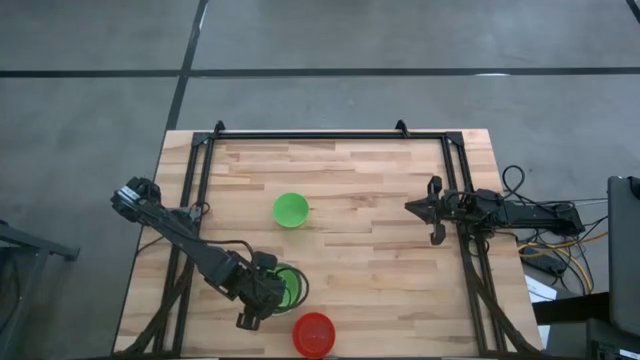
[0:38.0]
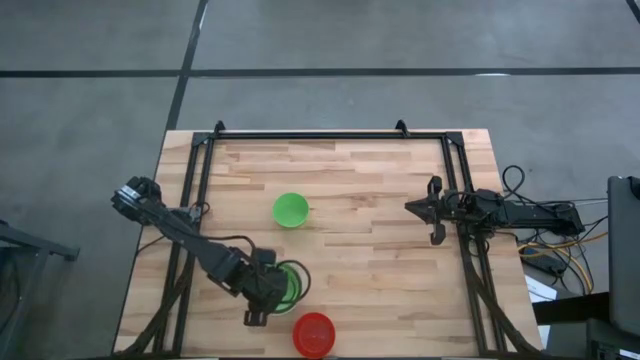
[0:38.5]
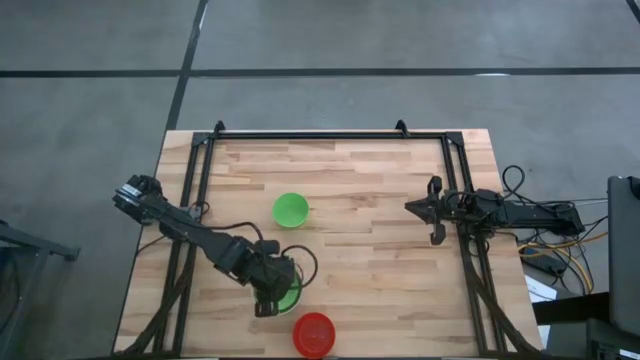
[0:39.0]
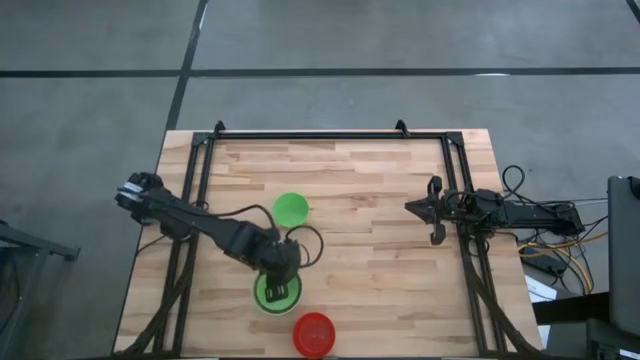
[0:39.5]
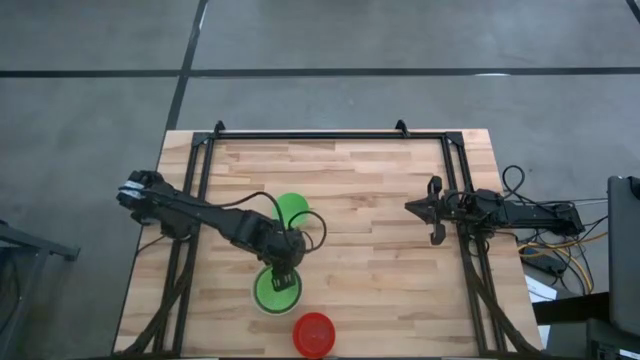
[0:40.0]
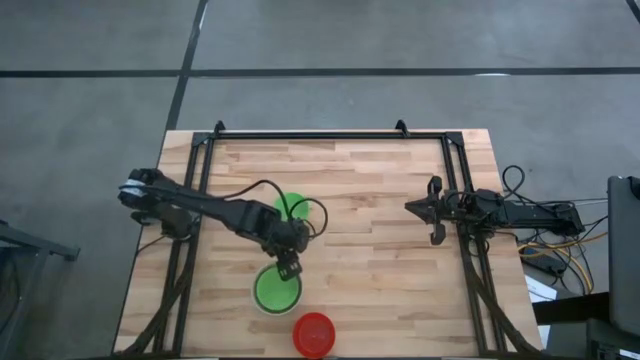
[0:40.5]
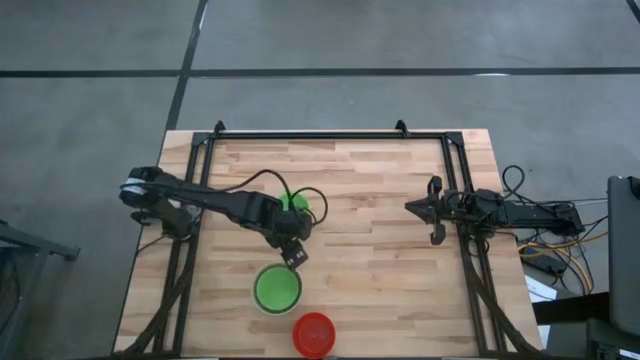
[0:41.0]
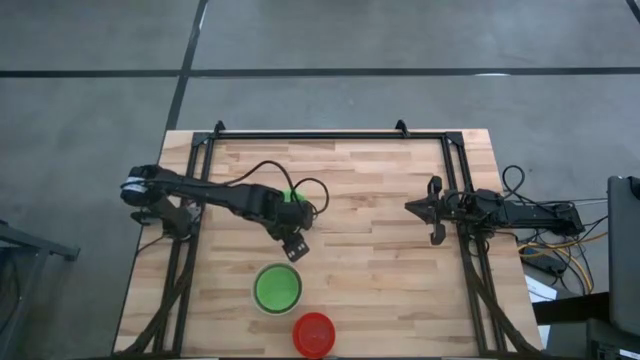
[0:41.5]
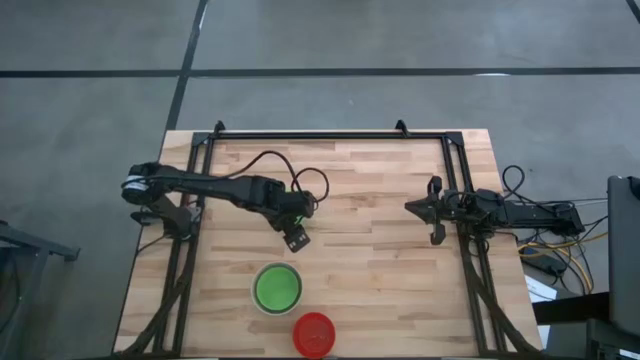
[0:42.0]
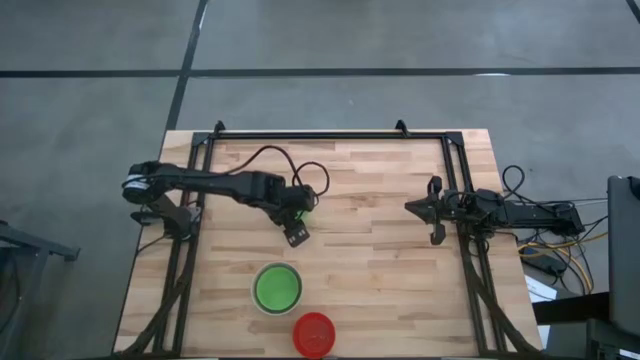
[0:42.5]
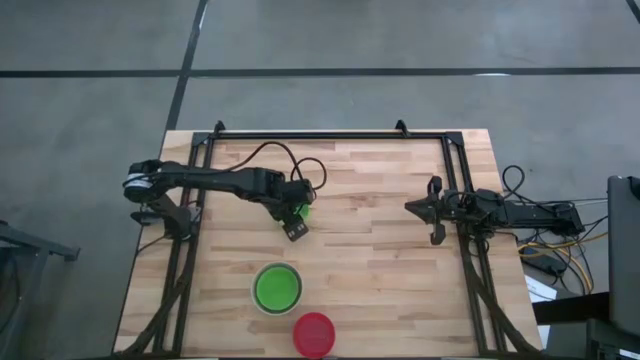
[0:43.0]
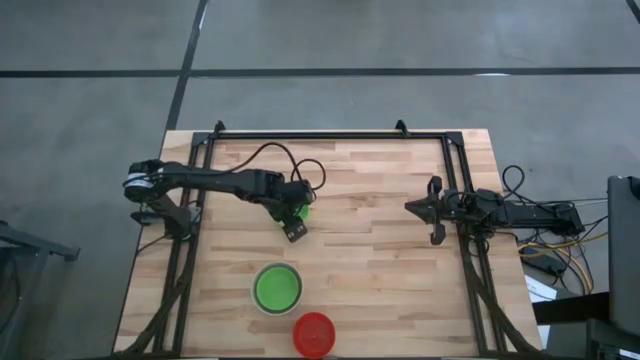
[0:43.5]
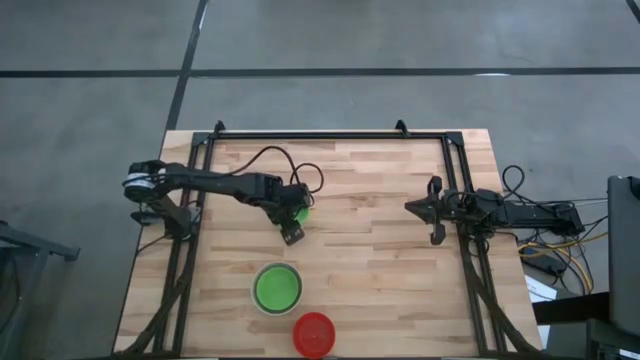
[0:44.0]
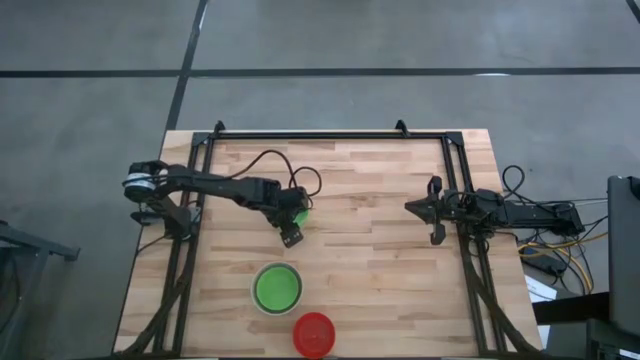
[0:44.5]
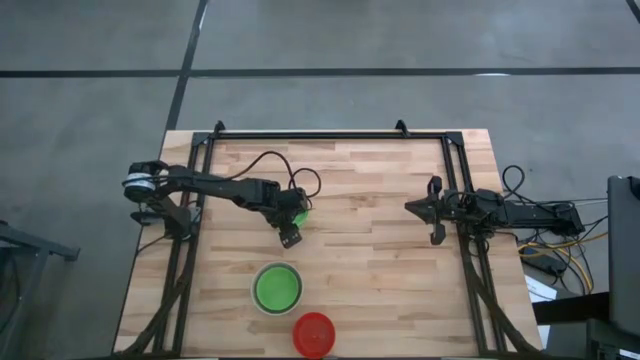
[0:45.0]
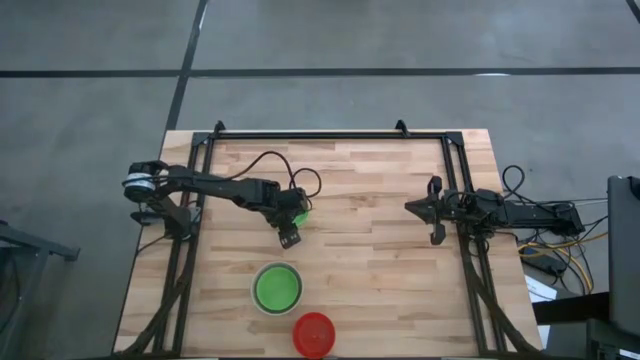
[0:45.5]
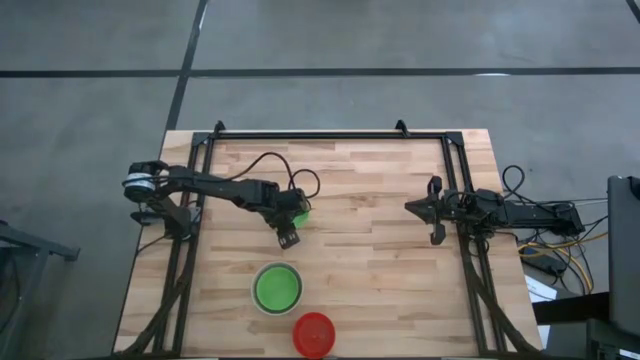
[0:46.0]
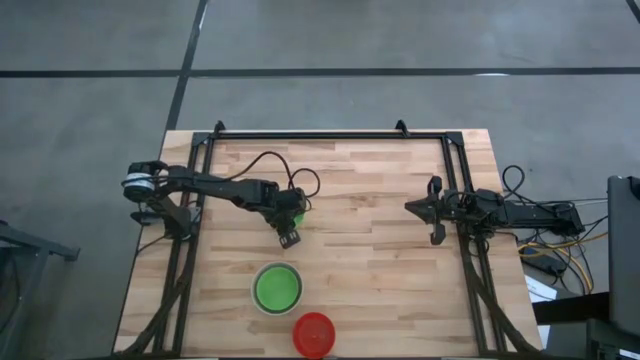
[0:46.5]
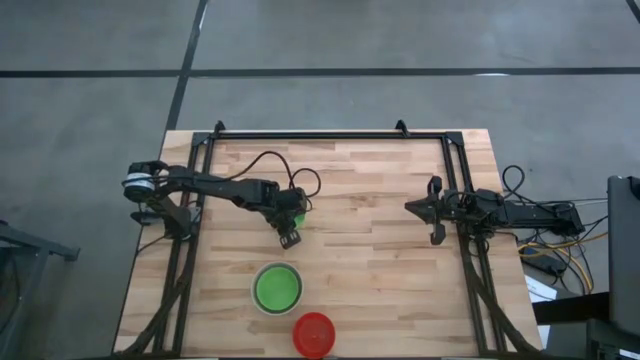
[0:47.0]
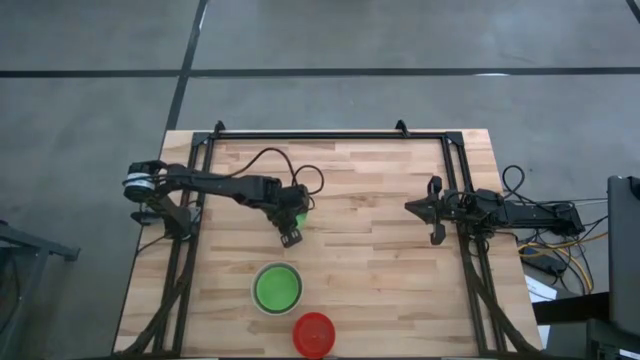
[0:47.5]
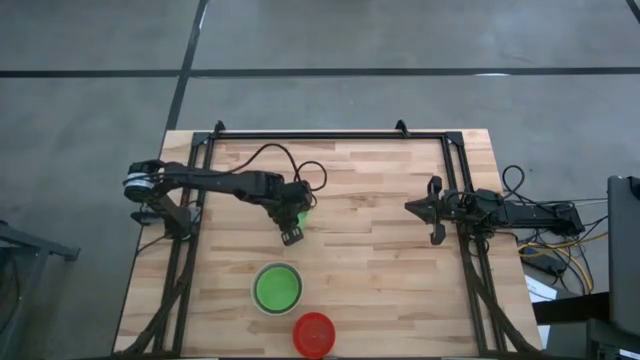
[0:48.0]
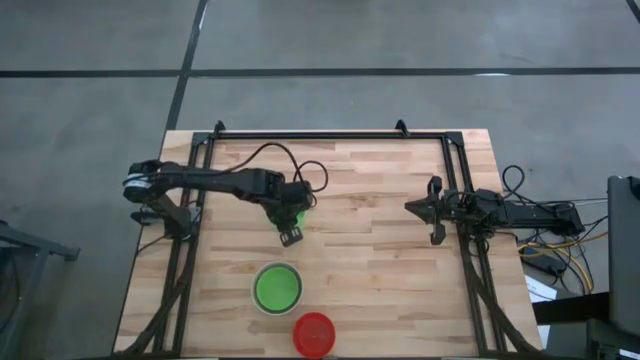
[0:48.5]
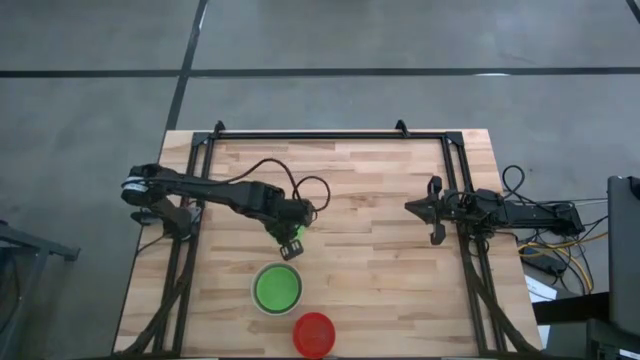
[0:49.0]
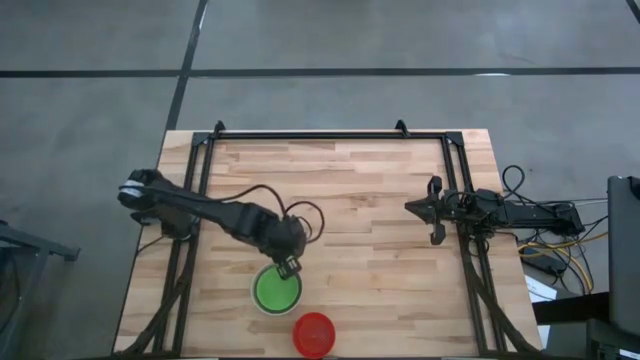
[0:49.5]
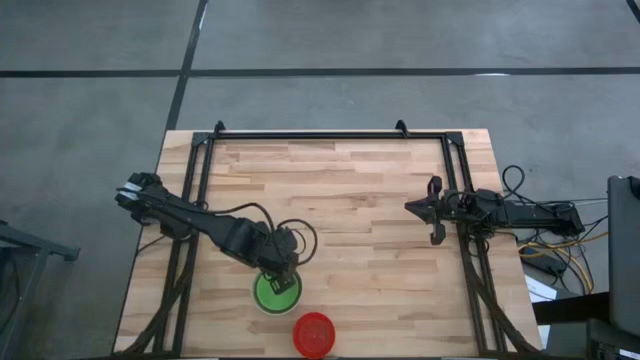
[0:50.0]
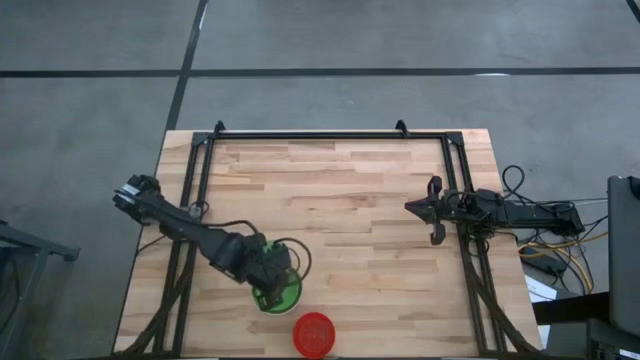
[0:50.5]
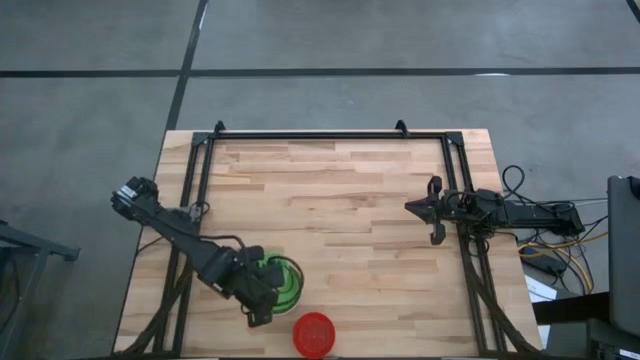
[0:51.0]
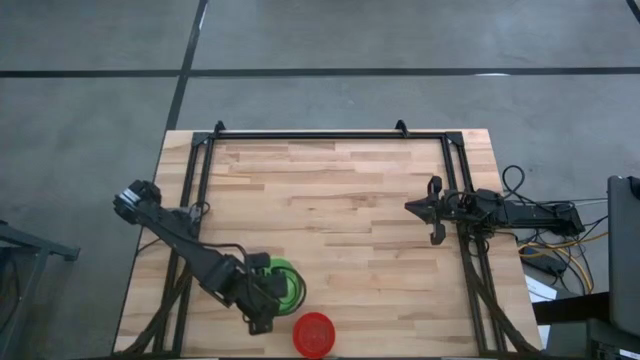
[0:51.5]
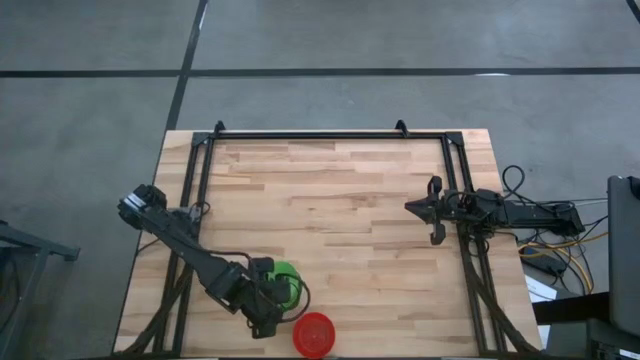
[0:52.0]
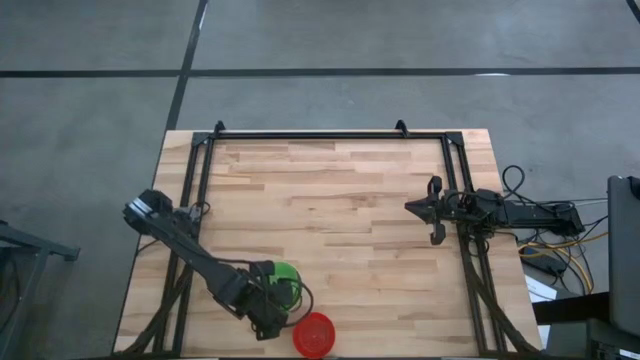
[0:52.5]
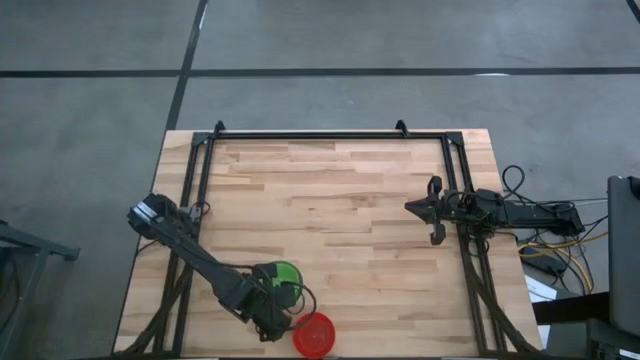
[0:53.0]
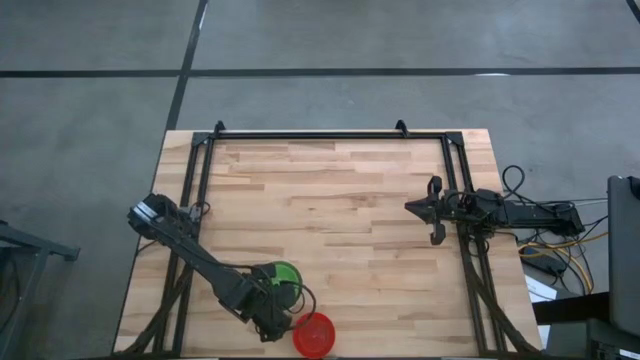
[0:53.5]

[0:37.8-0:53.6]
Stack the green bowl on the green bowl

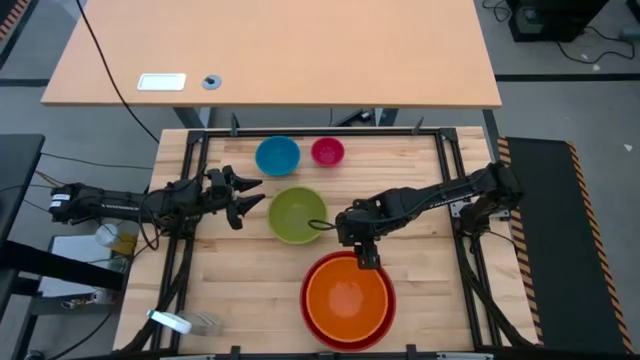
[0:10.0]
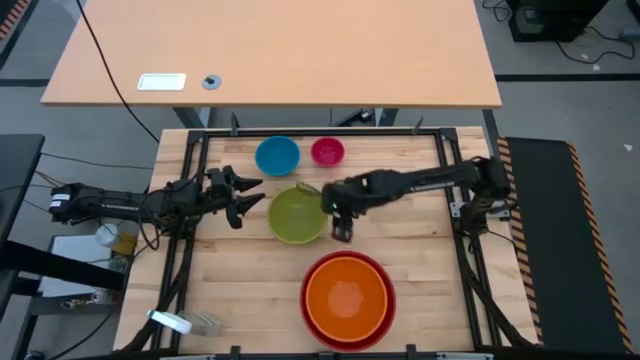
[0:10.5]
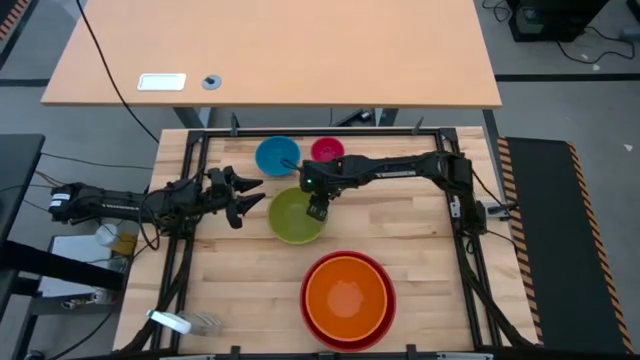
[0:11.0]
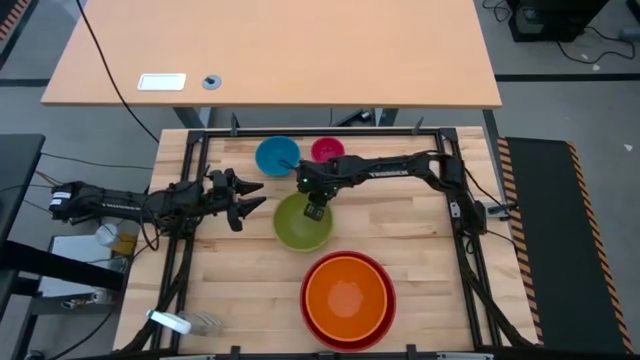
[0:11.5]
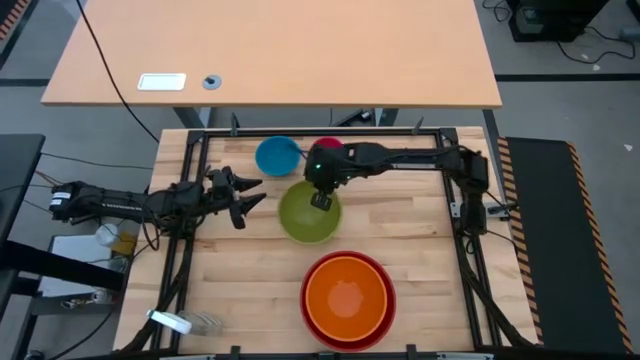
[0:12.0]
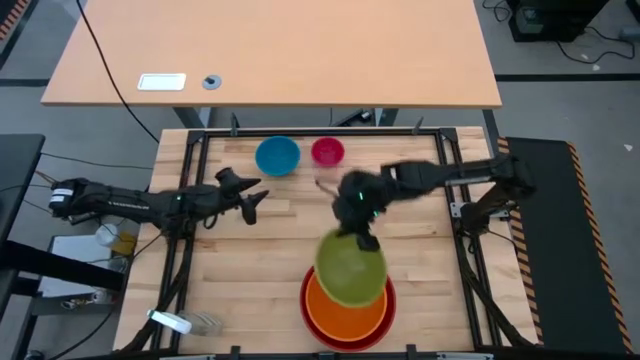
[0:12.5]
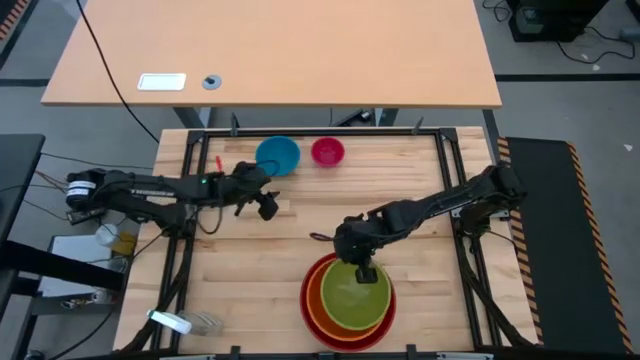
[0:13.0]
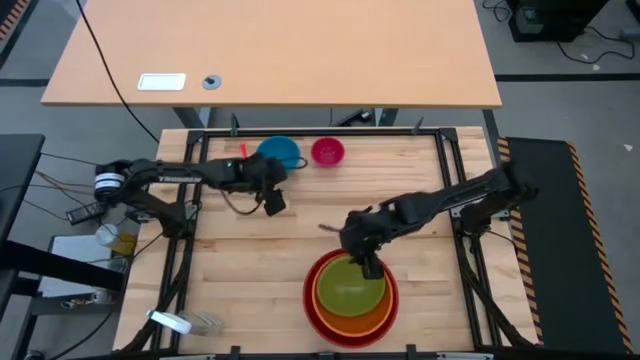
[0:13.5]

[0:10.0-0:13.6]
Stack the green bowl on top of the orange bowl

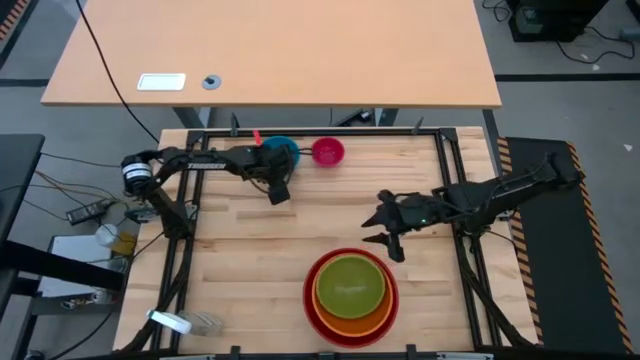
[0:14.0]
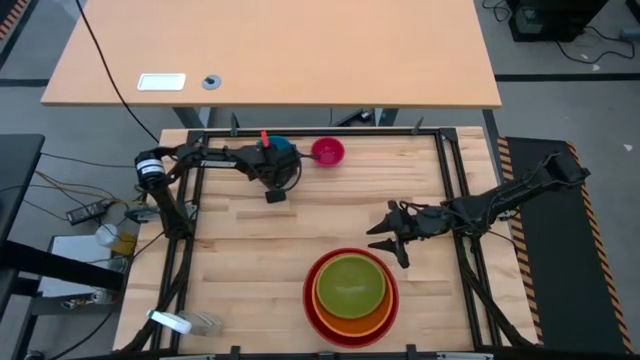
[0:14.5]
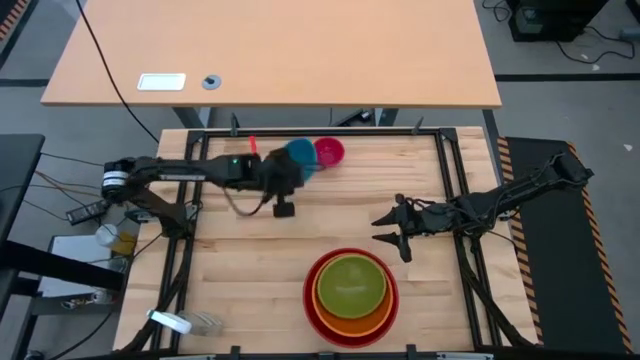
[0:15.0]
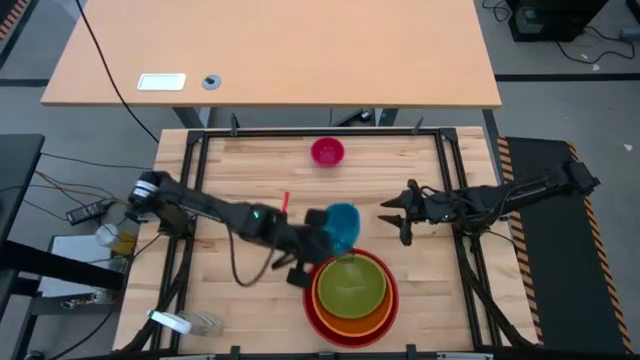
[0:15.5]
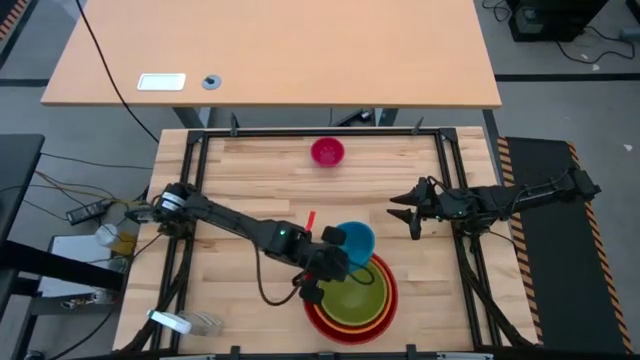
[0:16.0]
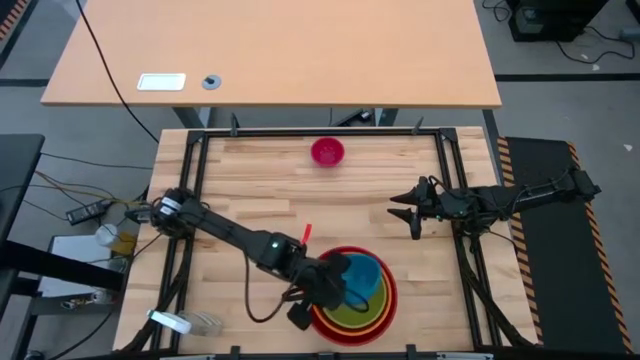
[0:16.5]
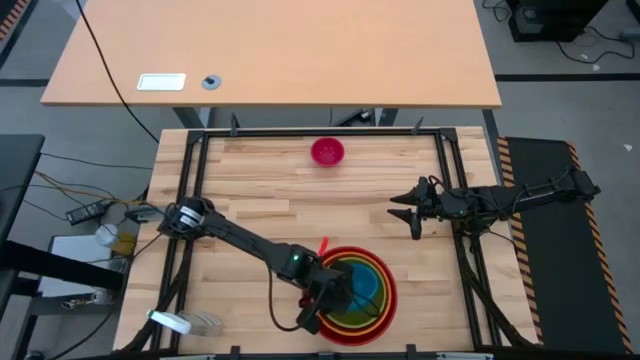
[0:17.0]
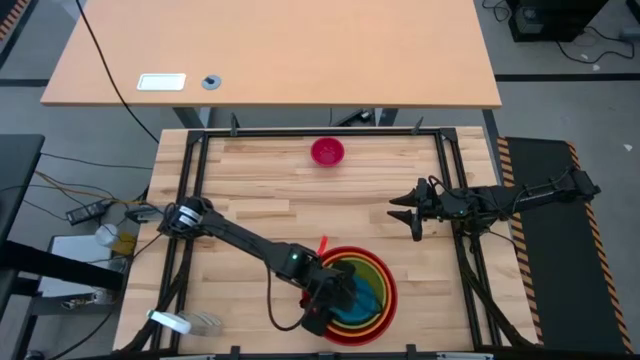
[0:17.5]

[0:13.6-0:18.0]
Stack the blue bowl on top of the green bowl
